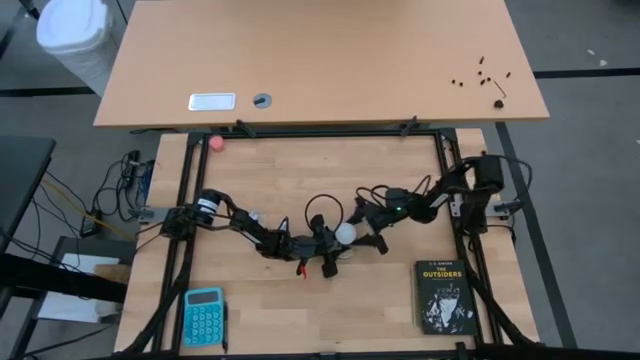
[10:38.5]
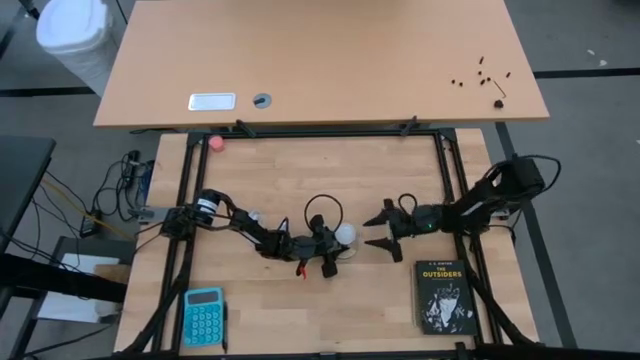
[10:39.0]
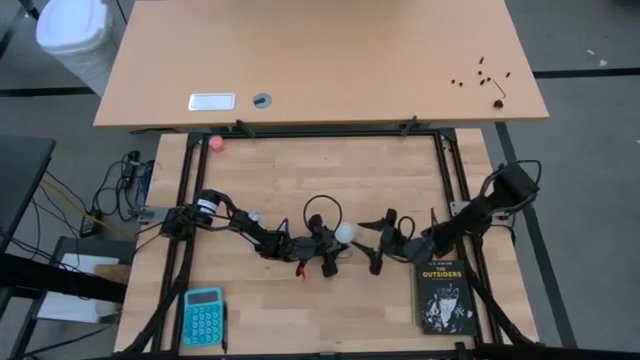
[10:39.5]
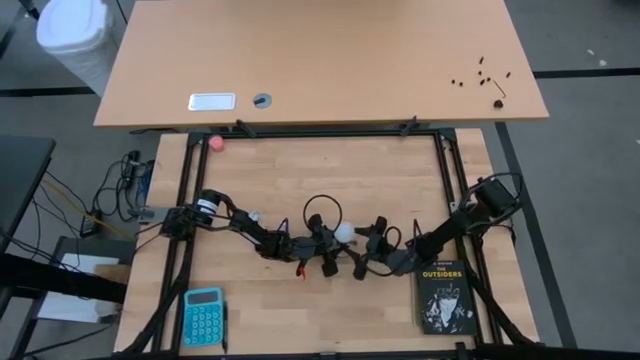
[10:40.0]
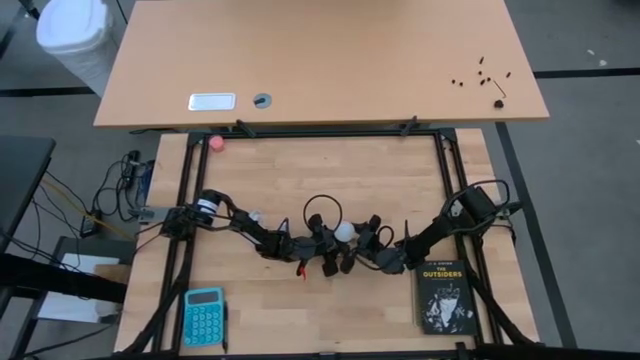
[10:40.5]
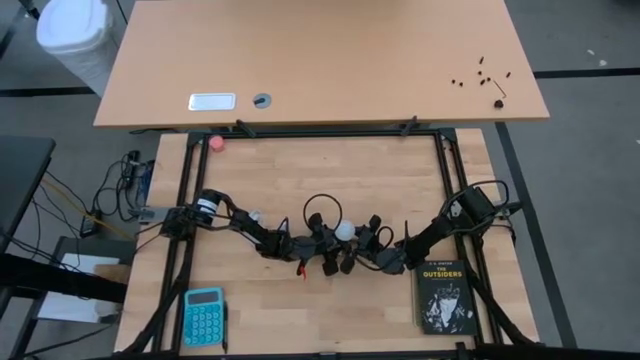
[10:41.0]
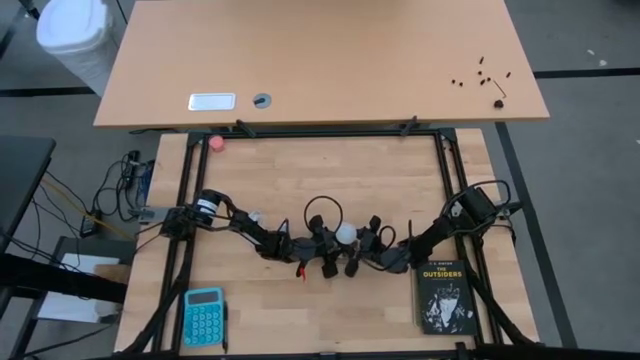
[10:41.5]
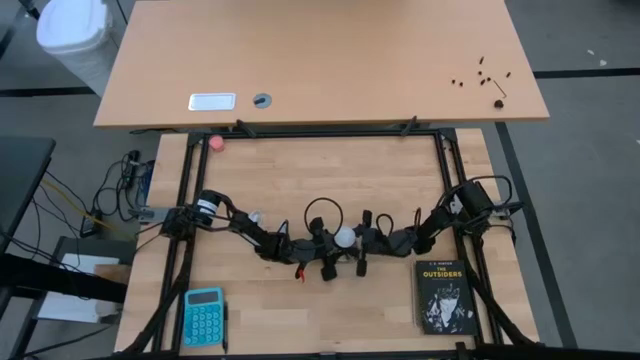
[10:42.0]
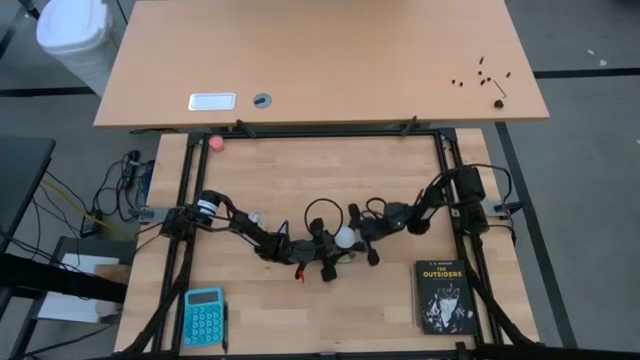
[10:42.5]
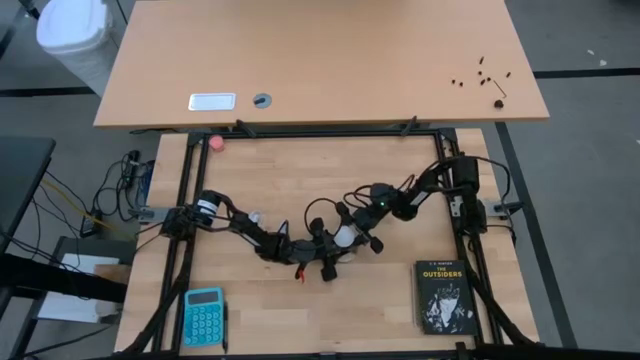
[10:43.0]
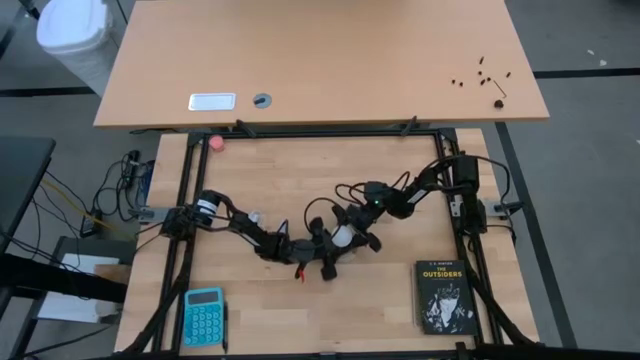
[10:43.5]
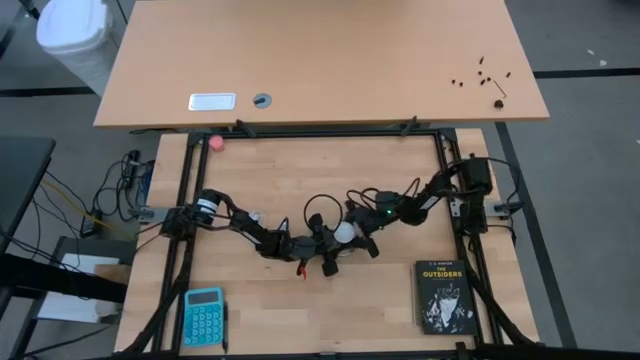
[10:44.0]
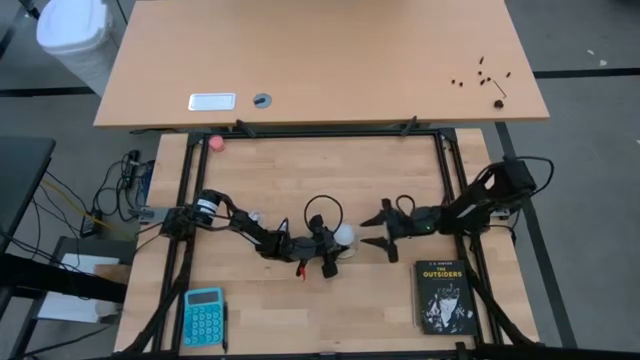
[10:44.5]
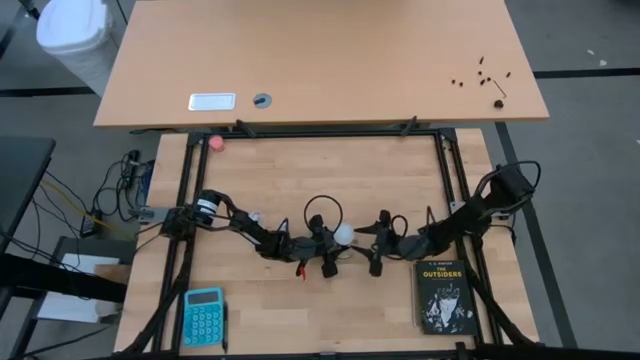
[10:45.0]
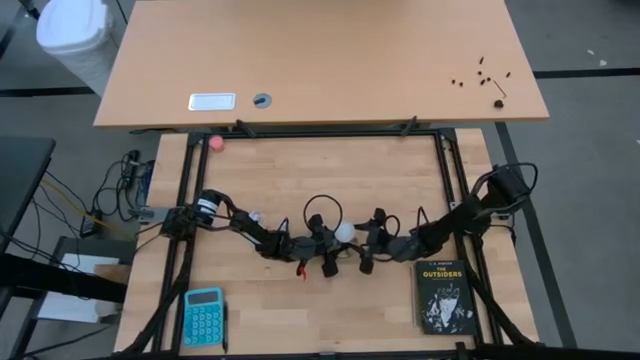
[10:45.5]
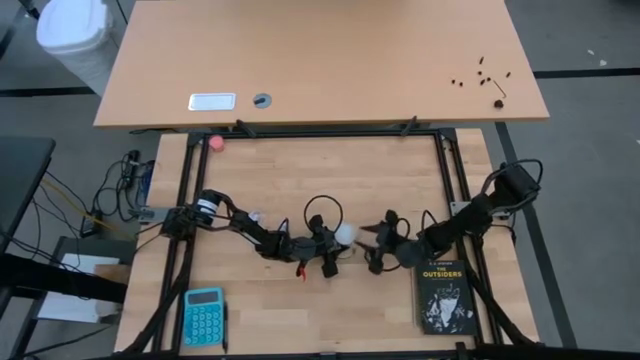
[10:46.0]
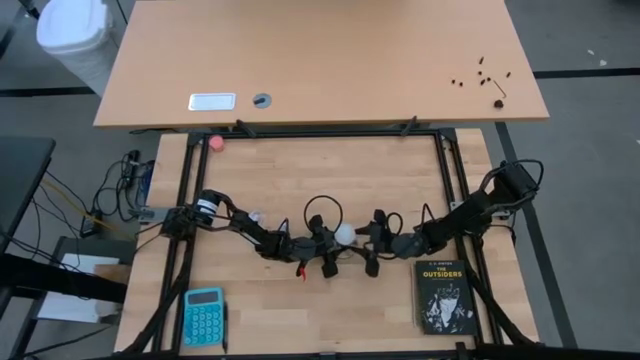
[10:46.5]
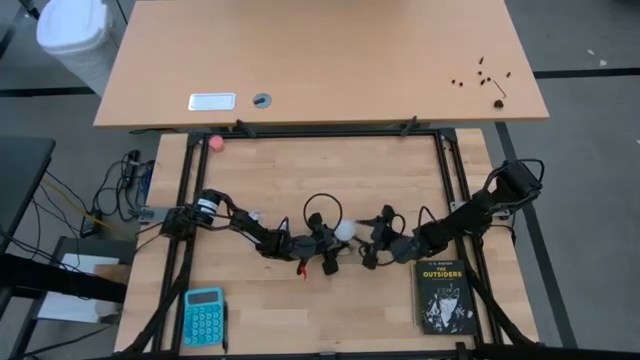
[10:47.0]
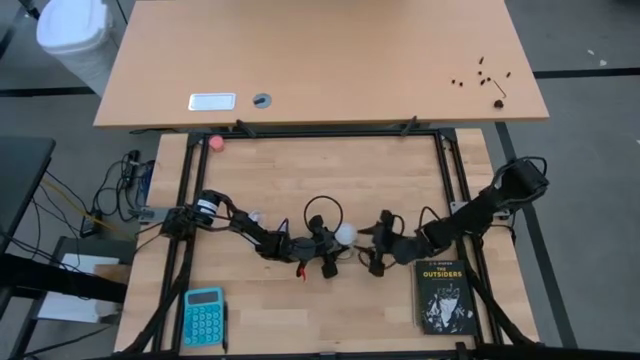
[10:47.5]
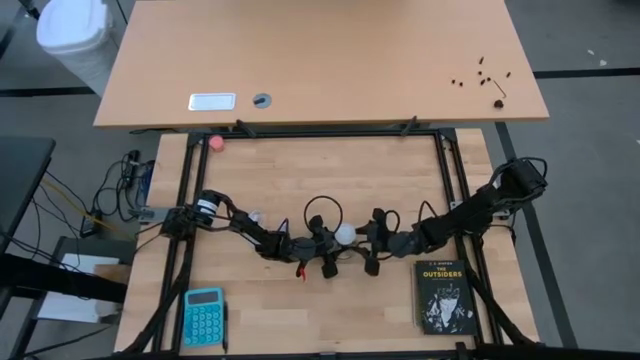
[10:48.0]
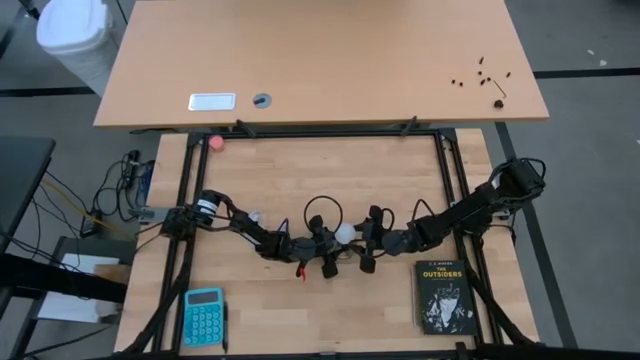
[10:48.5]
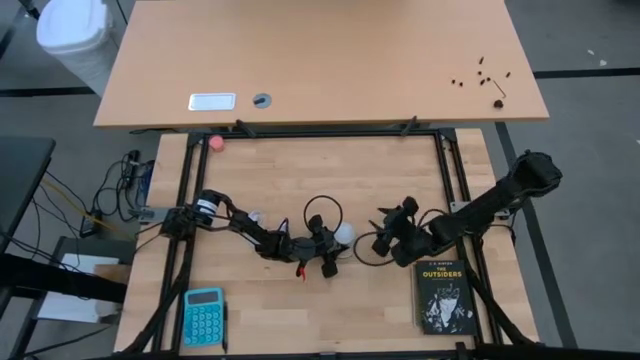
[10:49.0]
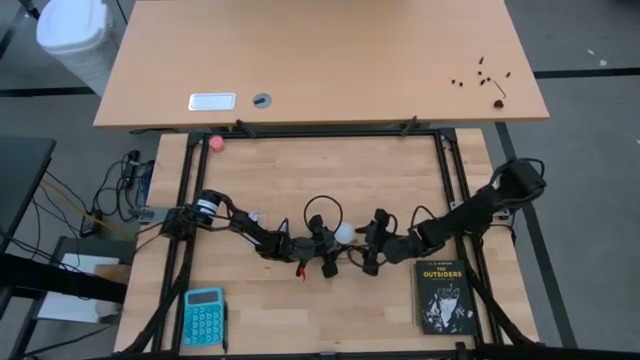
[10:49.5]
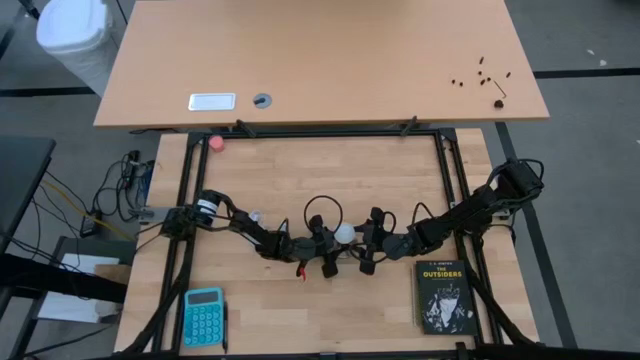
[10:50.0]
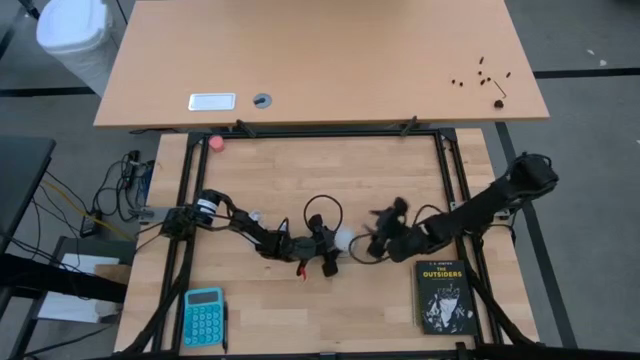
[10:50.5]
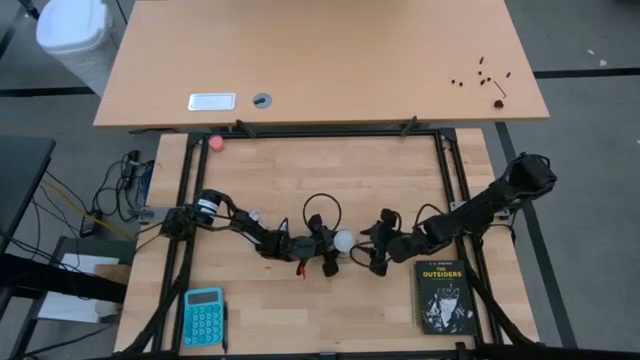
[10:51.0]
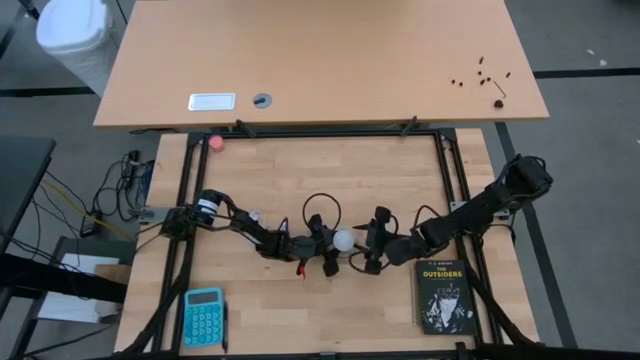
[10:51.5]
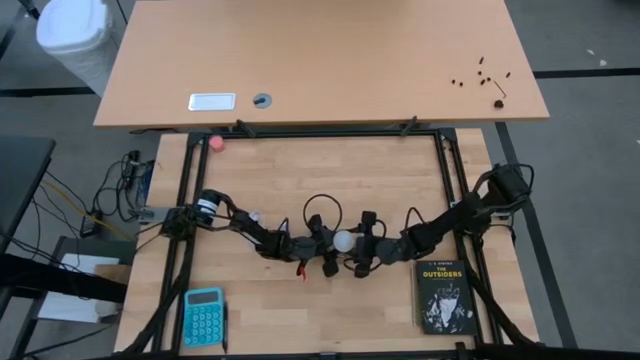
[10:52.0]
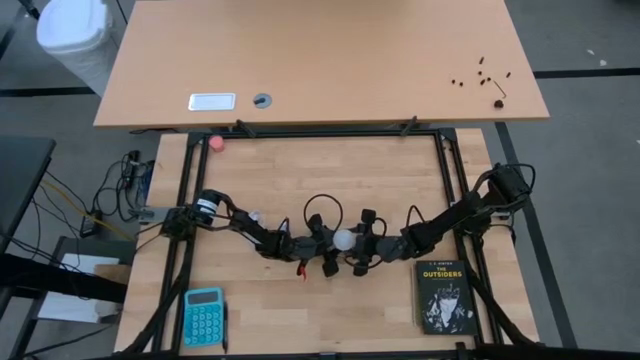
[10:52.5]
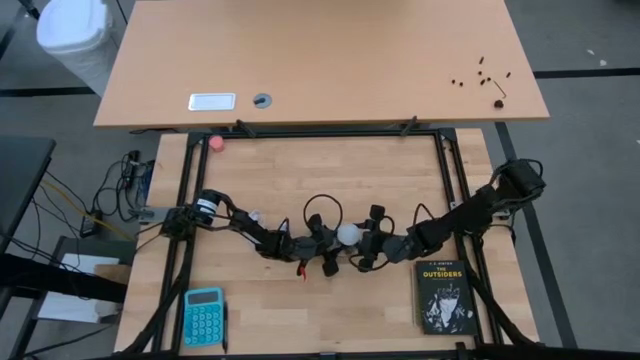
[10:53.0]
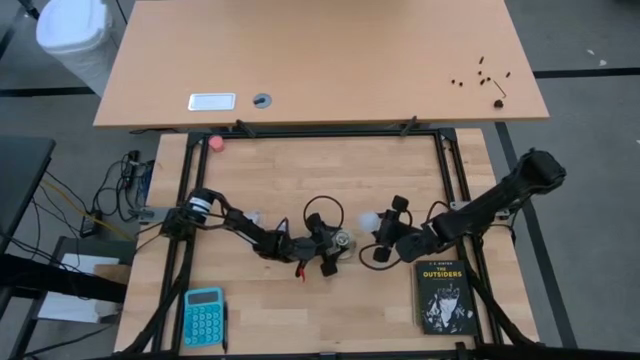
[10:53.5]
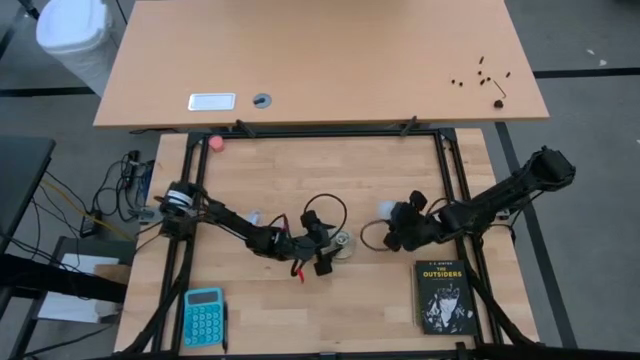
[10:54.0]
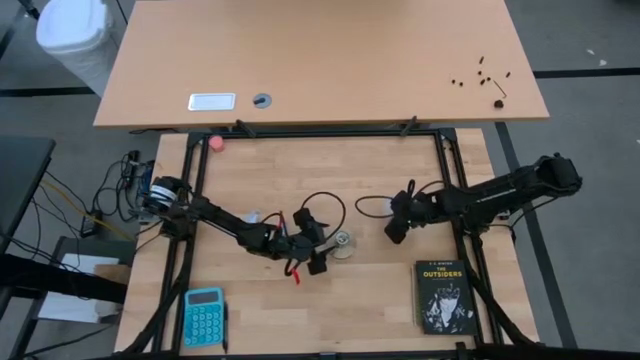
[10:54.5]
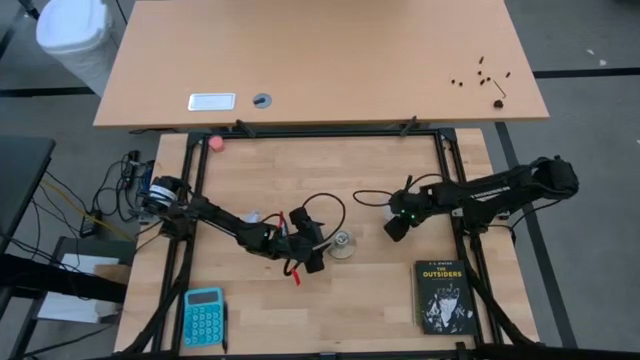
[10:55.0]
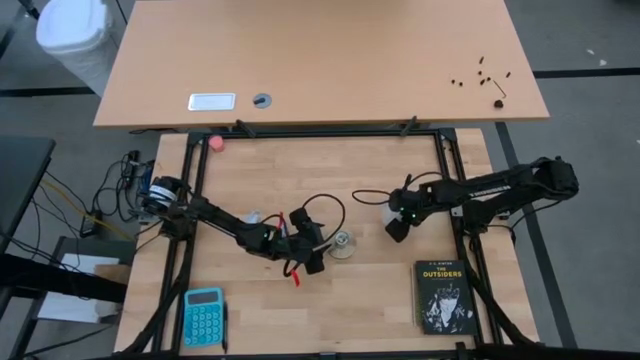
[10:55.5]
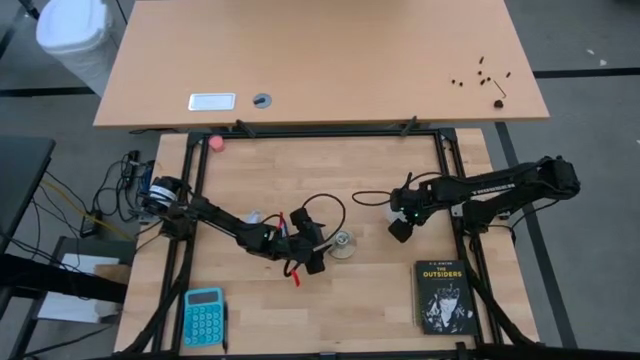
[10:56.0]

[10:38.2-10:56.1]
Task: Screw lightbulb
Remove the white lightbulb from the silver lamp

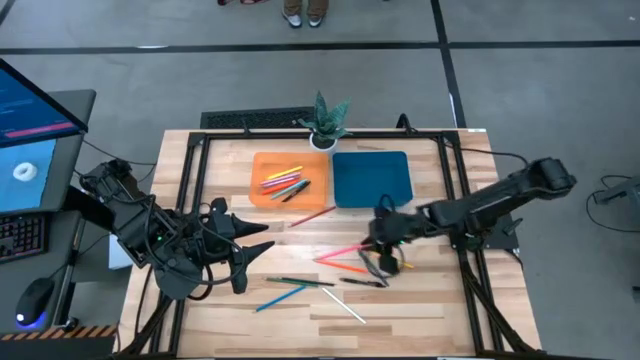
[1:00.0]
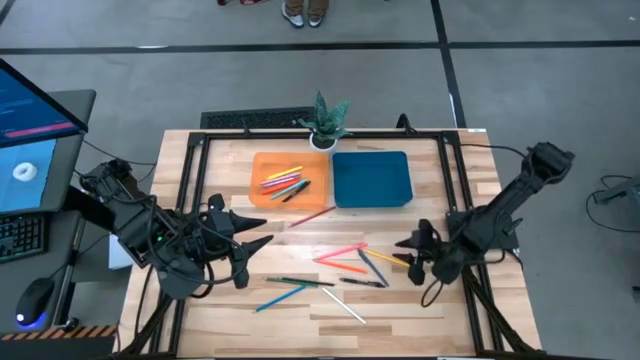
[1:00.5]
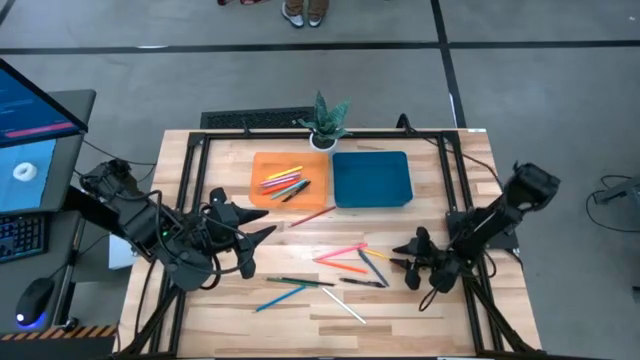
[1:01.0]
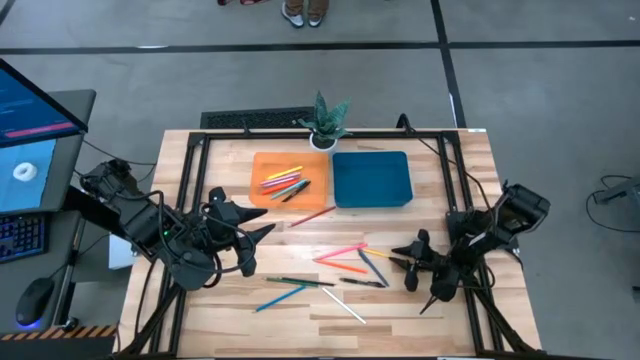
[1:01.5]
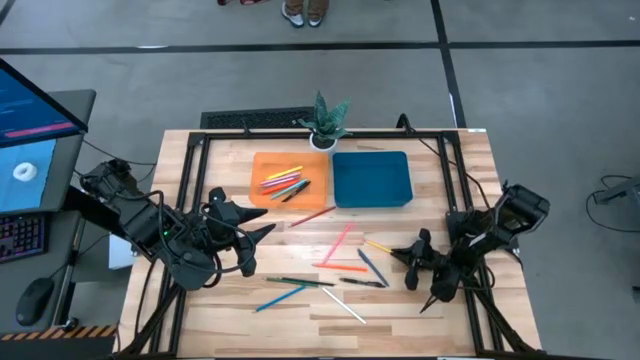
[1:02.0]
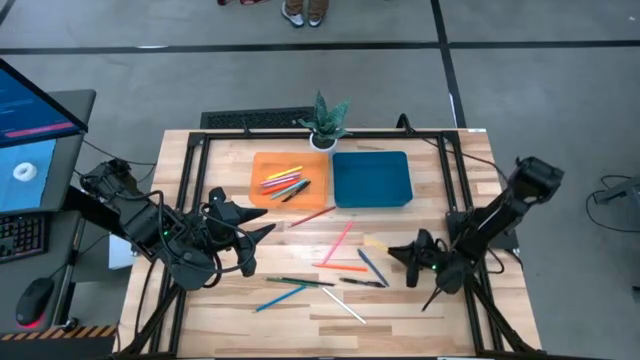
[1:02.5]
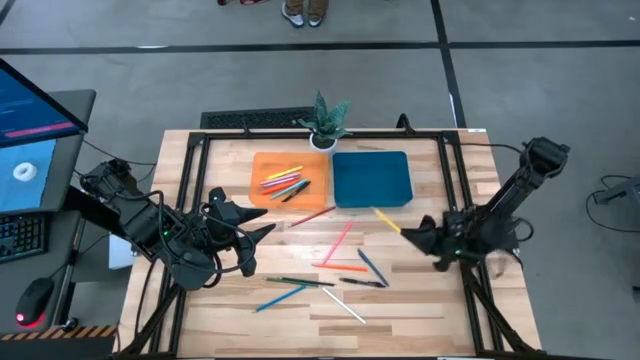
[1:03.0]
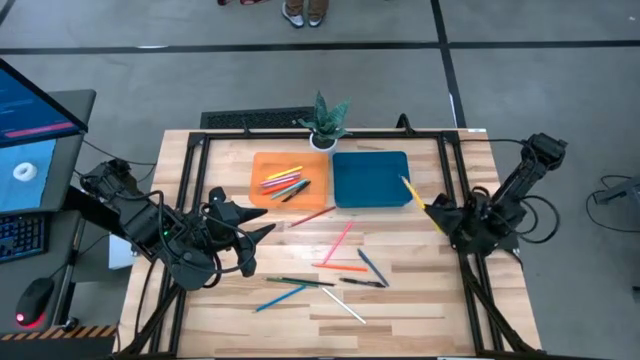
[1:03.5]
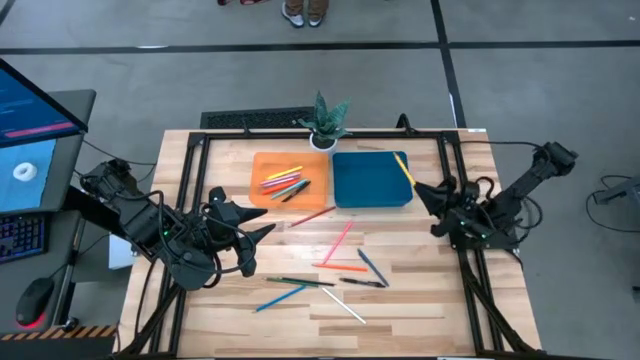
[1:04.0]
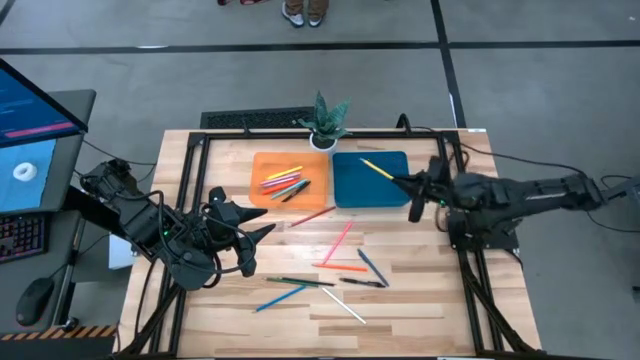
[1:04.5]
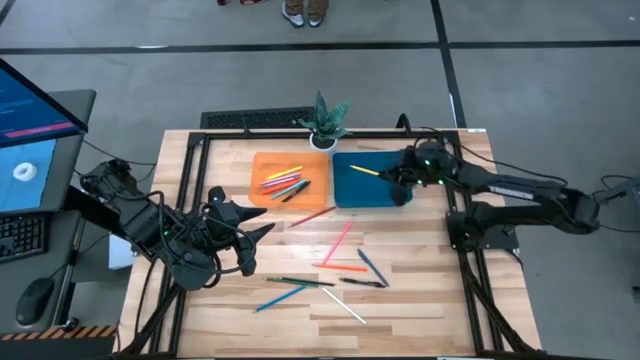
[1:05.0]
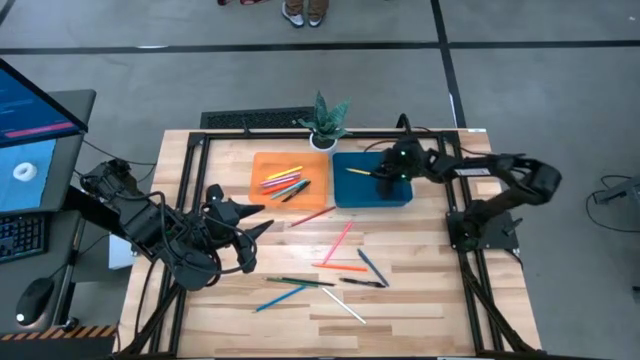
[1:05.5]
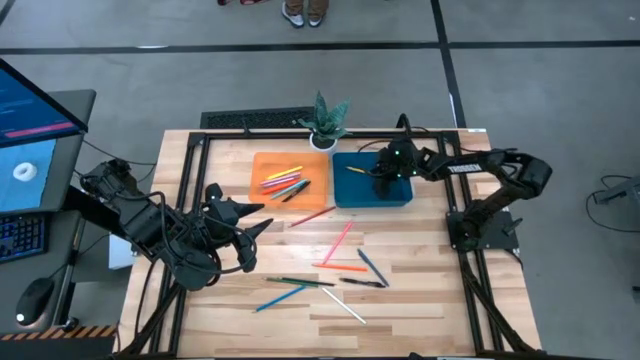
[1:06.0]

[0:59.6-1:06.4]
Task: Sort pens & pencils
Put the yellow pencil into the blue bin
